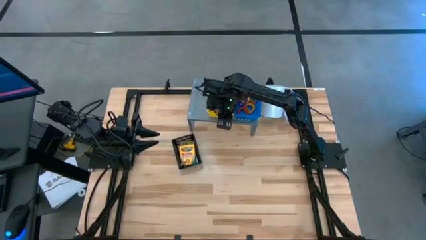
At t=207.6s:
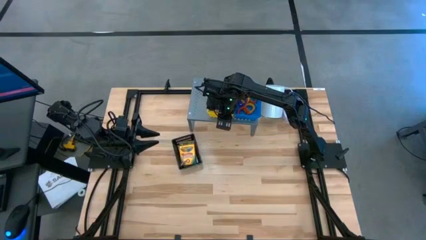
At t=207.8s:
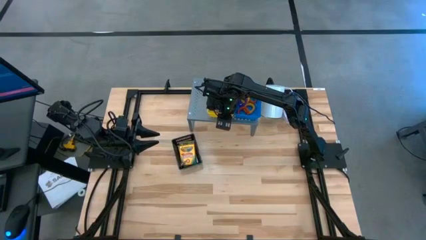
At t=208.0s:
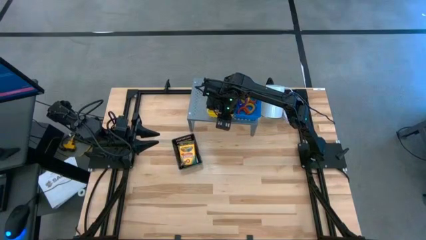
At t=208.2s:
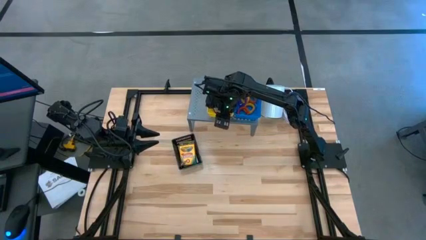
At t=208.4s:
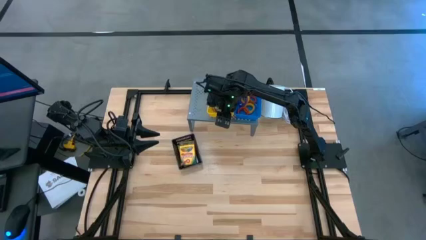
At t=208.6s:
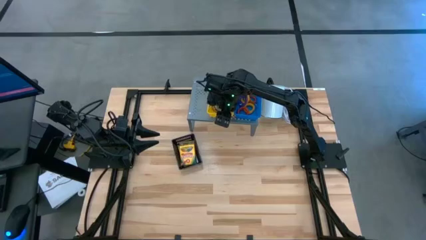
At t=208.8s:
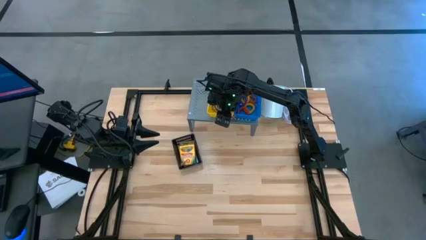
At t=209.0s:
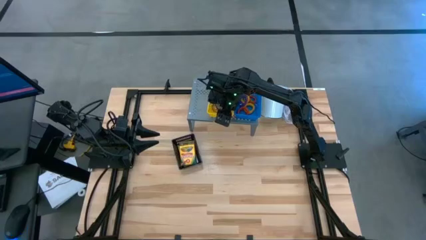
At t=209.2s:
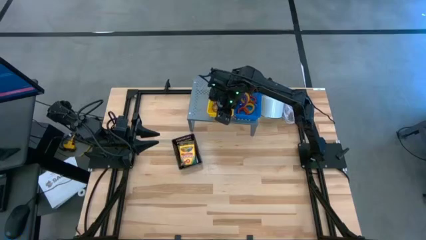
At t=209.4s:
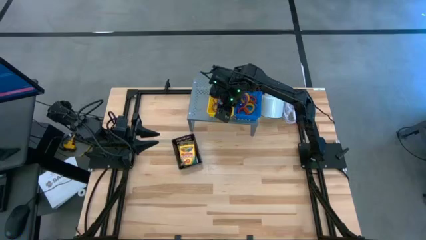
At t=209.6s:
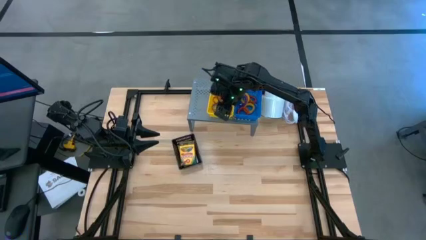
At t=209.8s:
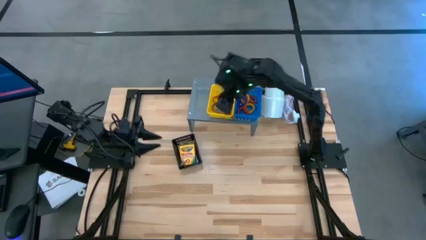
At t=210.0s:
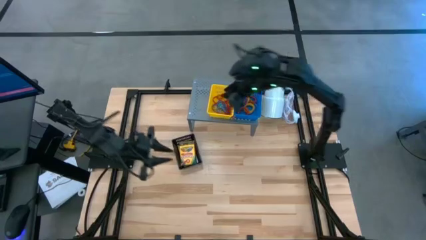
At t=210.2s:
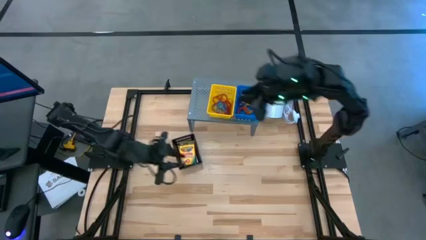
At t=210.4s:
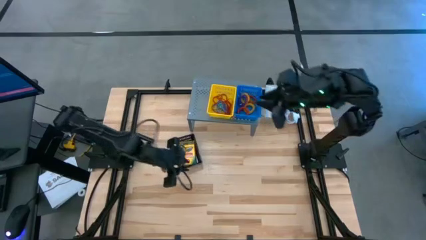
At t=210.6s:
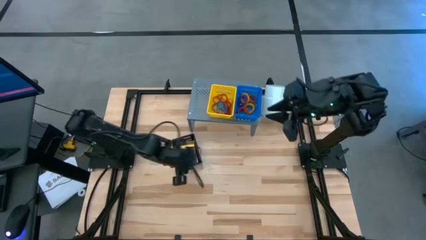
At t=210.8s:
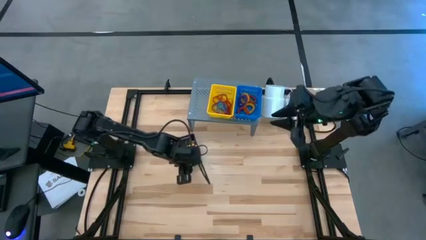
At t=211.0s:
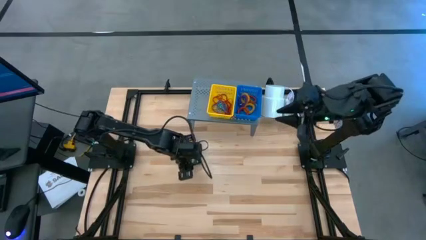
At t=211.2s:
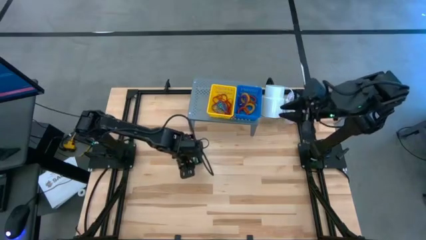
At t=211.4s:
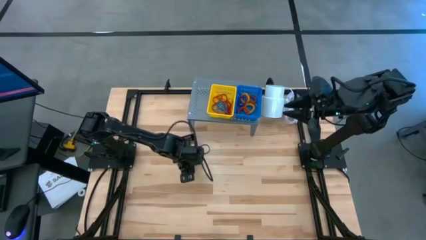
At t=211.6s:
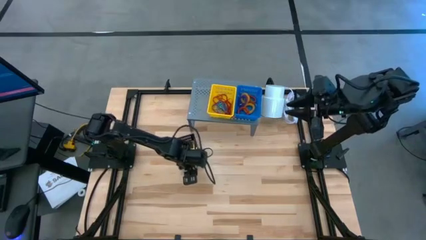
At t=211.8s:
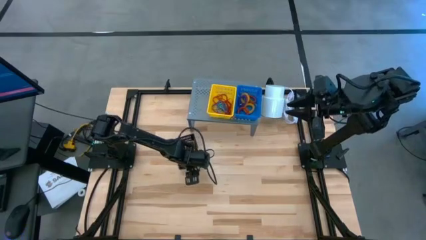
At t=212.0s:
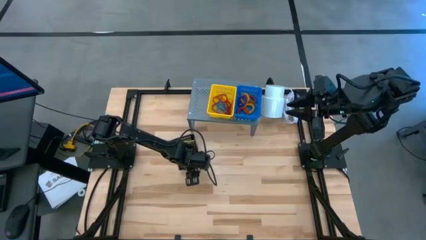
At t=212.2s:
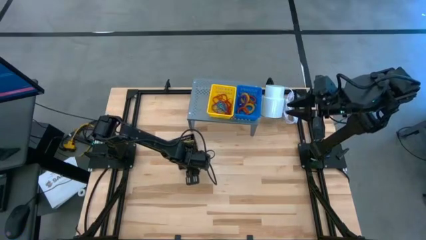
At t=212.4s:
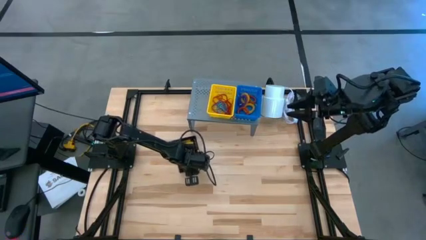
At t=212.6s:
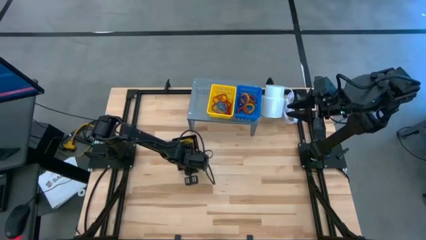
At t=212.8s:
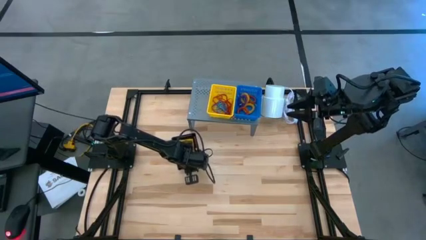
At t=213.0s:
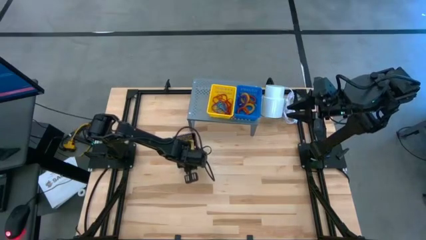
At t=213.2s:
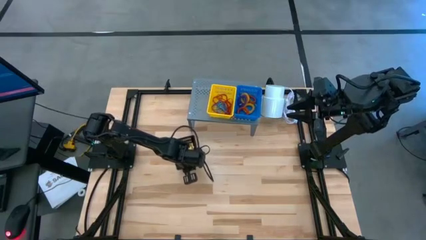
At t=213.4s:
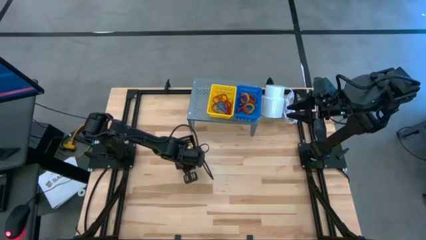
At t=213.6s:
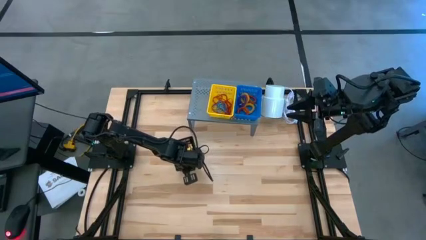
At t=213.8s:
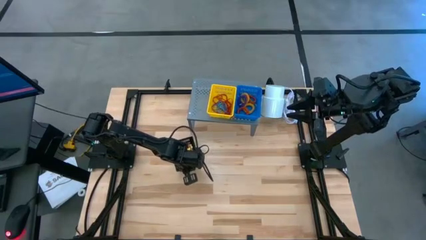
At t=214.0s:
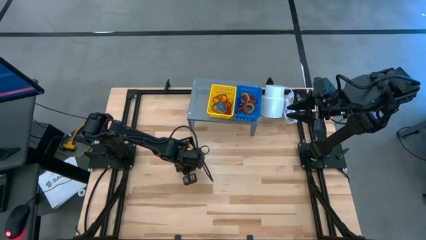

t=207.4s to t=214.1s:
Task: Pick & Place Office Desk Supplies
Put the black basket on the shelf

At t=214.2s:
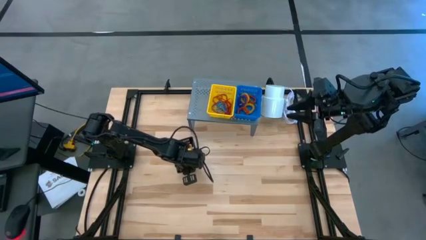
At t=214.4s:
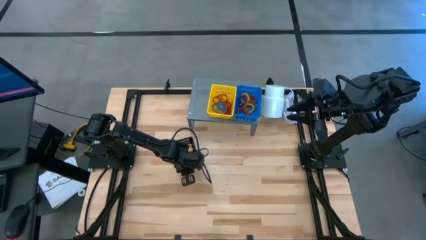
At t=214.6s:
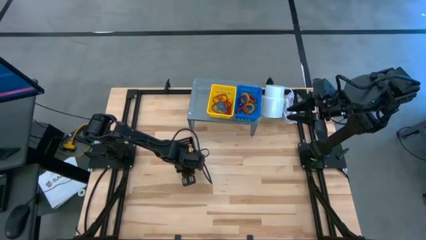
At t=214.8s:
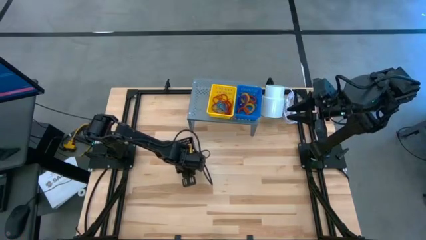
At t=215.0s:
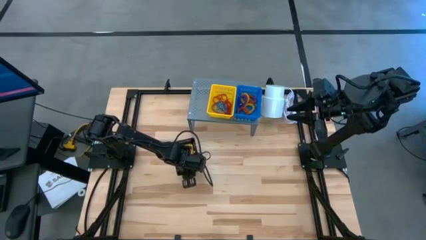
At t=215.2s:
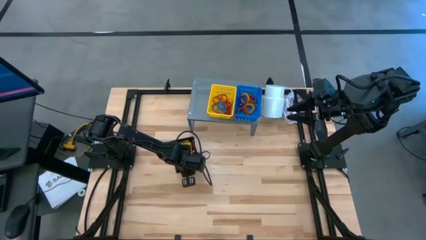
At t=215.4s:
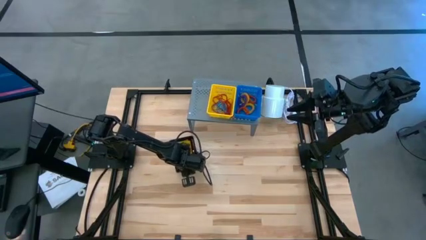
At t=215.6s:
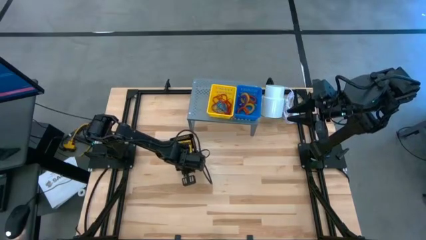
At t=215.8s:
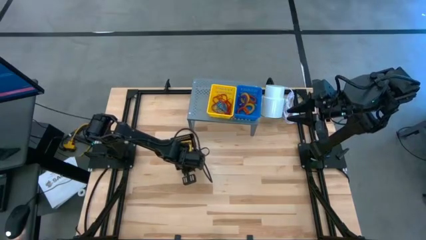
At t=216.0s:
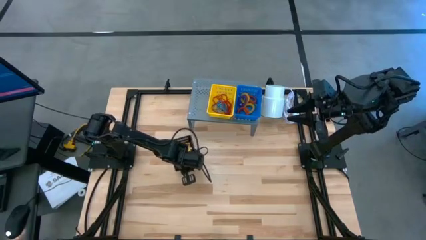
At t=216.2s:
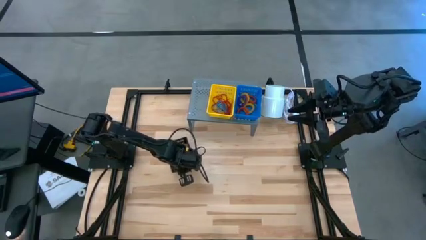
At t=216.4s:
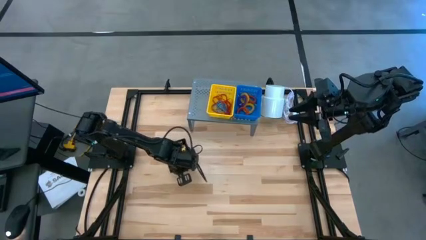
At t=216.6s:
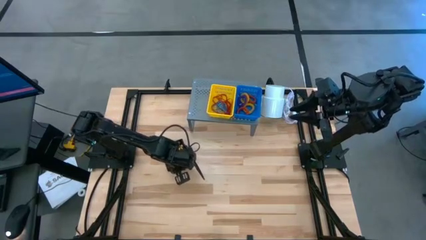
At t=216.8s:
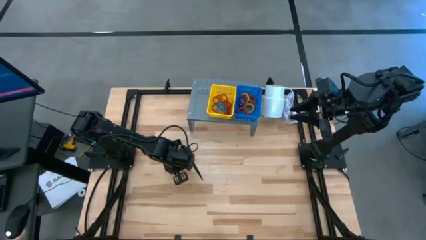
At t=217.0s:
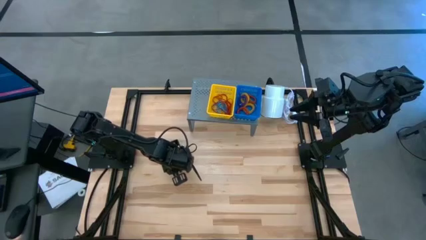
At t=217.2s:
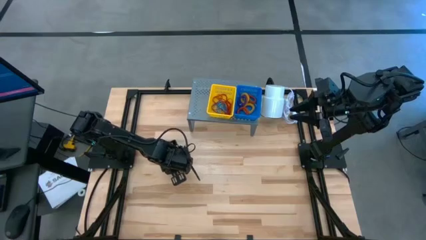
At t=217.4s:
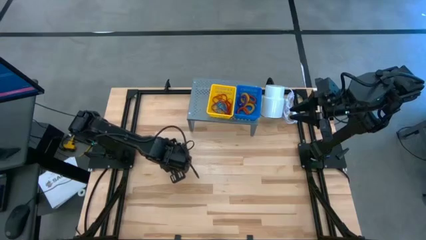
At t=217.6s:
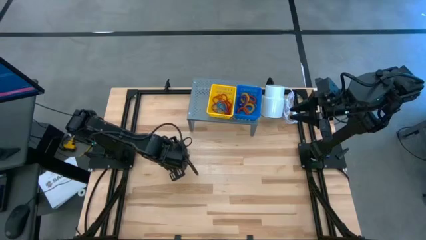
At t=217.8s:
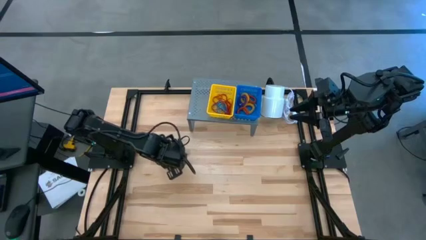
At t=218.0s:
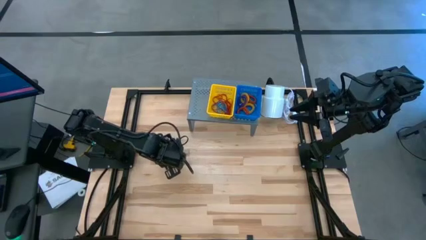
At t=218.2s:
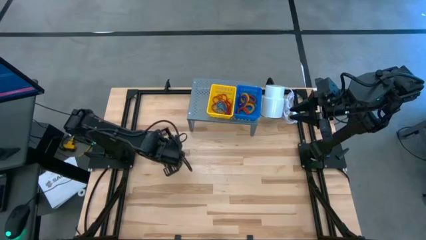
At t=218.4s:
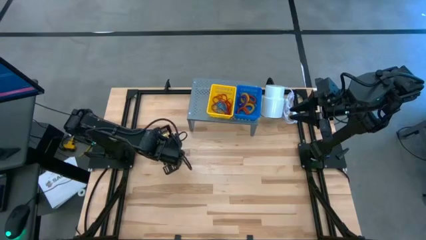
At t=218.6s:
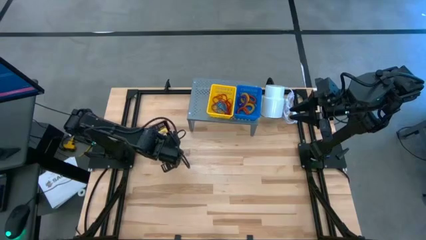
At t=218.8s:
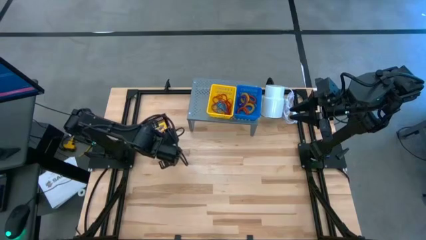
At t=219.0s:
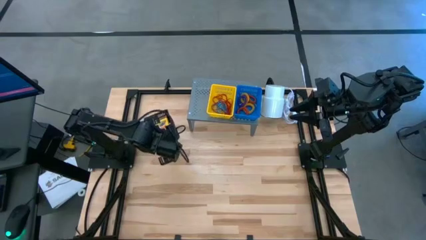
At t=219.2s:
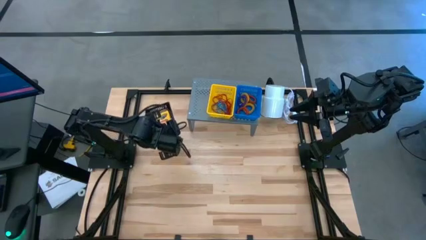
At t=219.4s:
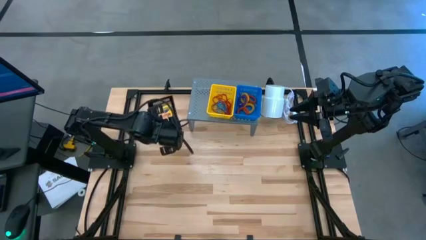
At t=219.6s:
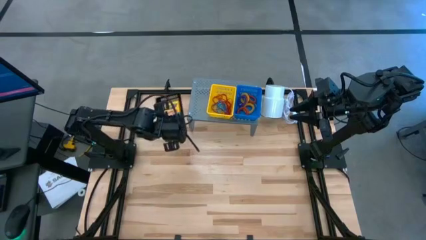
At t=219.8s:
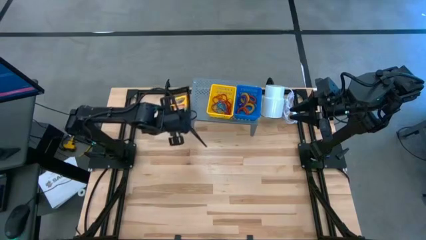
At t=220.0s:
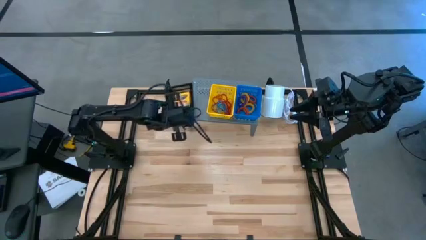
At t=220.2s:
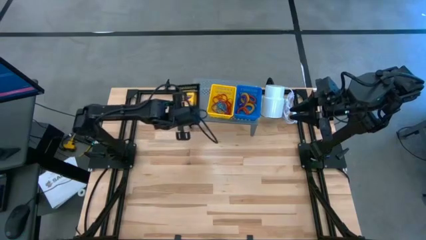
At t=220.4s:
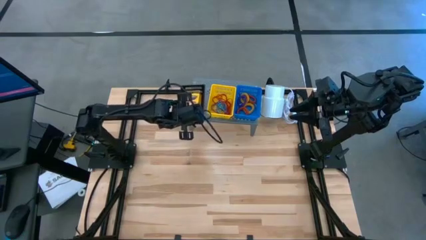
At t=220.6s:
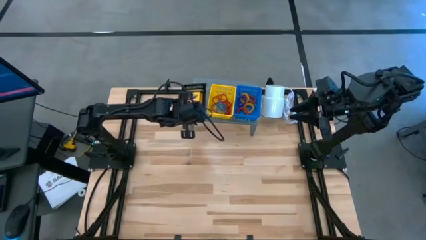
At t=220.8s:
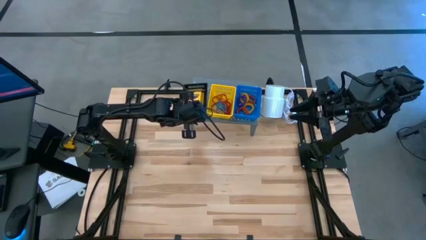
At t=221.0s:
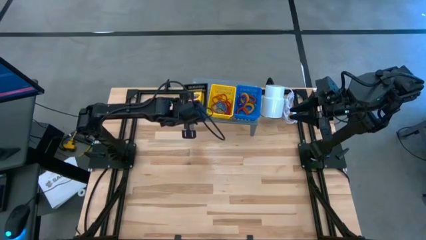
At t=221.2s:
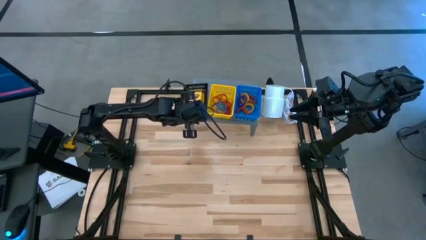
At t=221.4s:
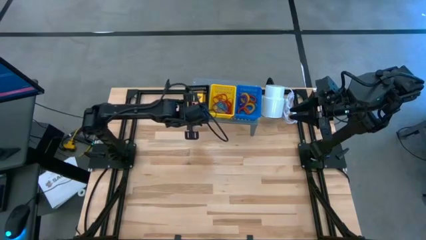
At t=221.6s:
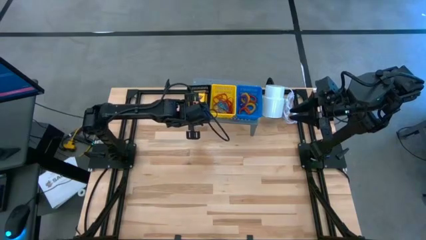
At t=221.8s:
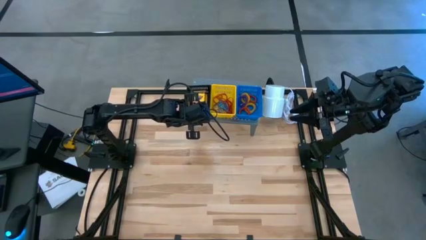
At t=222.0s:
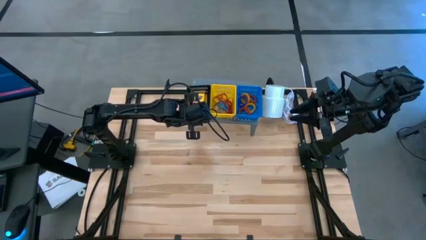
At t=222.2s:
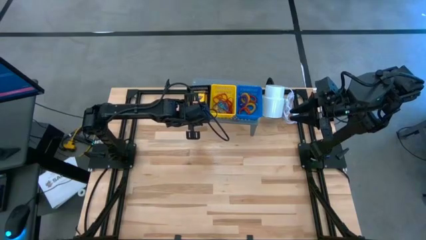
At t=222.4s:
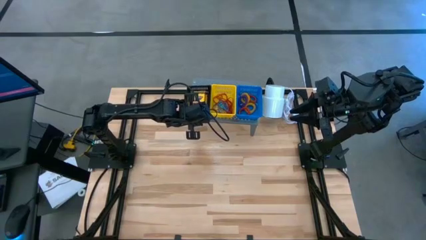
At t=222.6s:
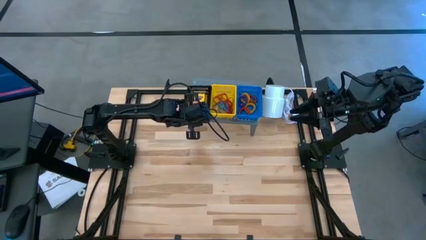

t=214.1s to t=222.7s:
Put the black basket on the shelf

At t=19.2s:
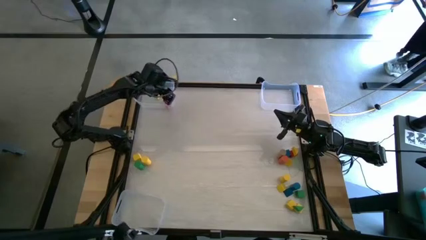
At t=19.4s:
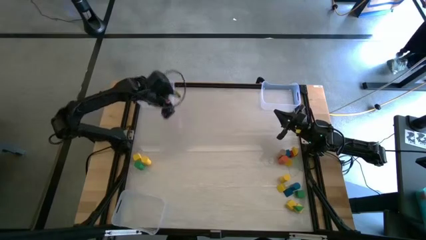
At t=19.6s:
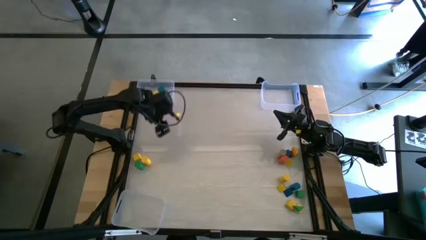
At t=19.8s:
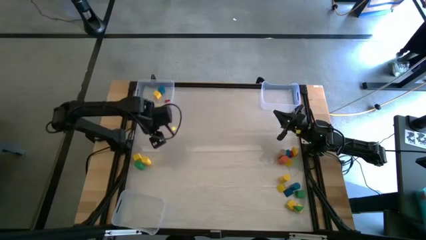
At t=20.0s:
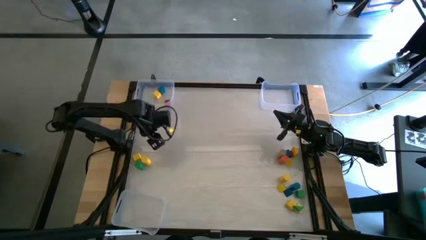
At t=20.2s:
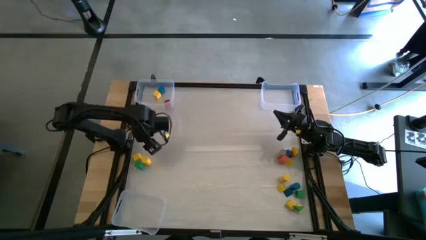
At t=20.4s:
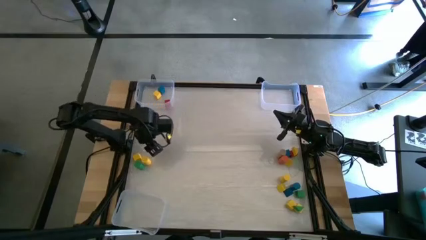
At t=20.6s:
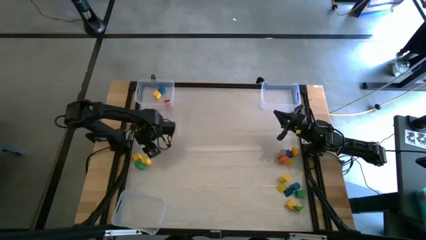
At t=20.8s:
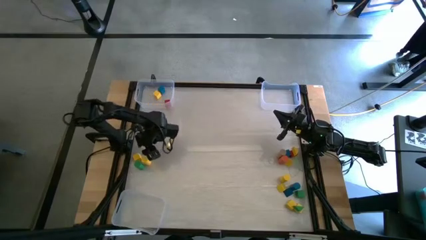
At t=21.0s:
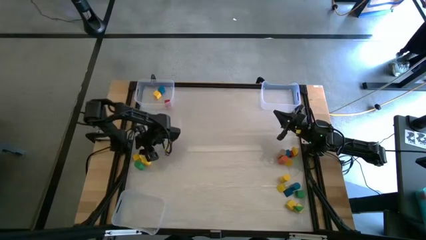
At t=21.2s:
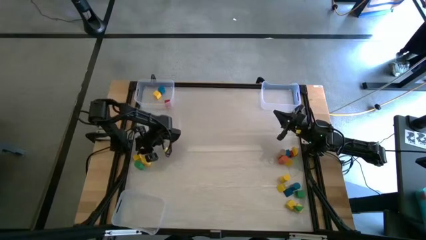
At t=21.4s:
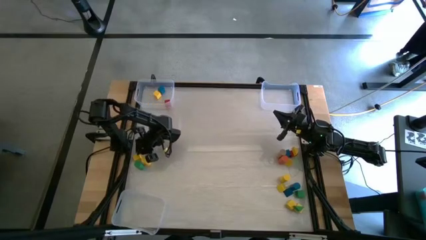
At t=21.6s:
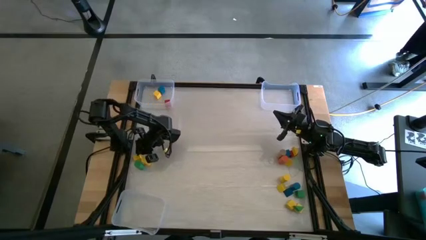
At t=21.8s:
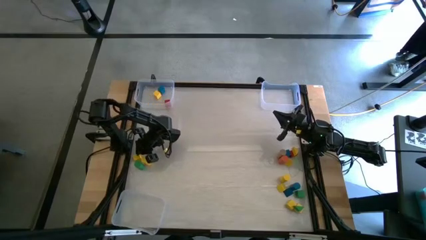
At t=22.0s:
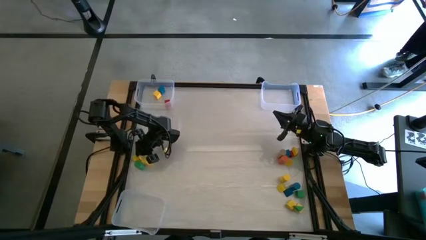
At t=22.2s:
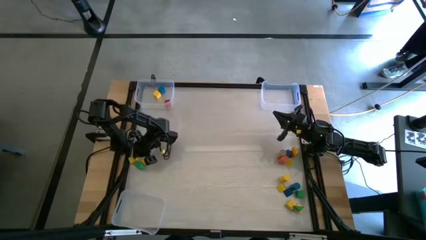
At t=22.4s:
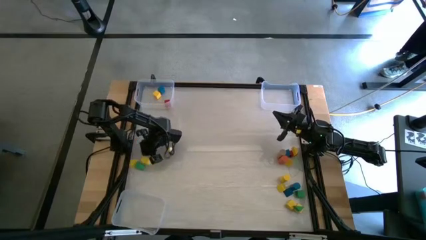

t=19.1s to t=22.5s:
Task: Sort blocks by size
Put the left yellow cube block into the top left transparent bin
